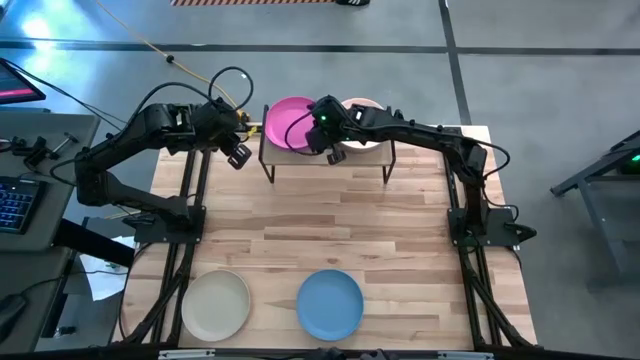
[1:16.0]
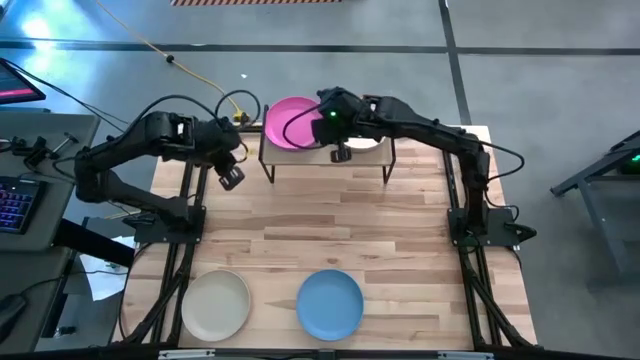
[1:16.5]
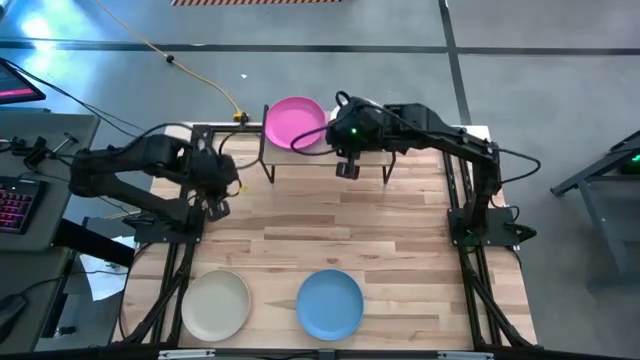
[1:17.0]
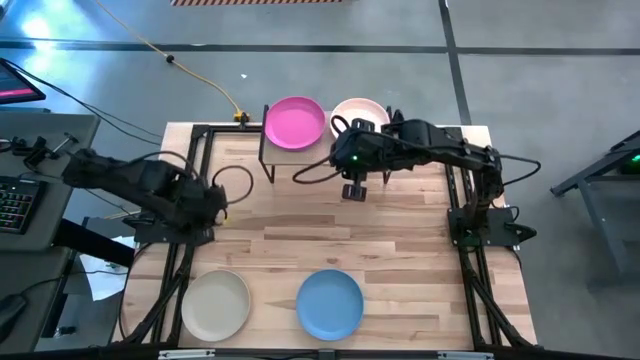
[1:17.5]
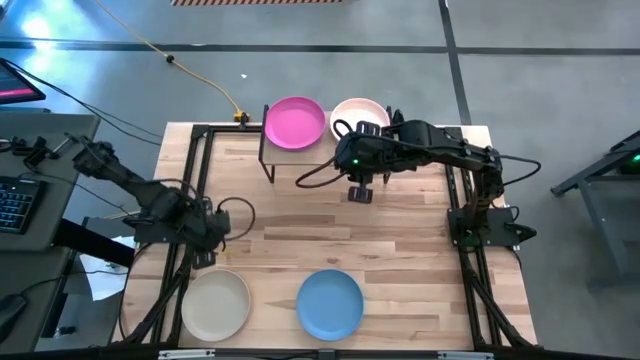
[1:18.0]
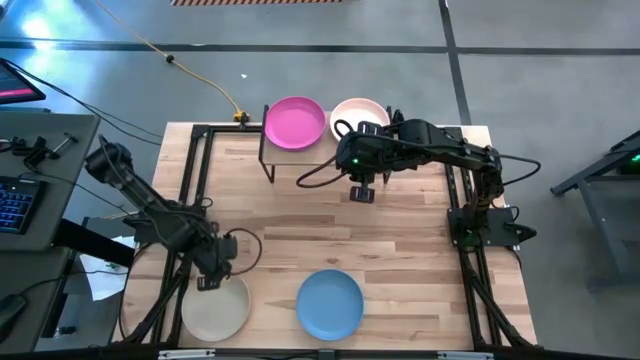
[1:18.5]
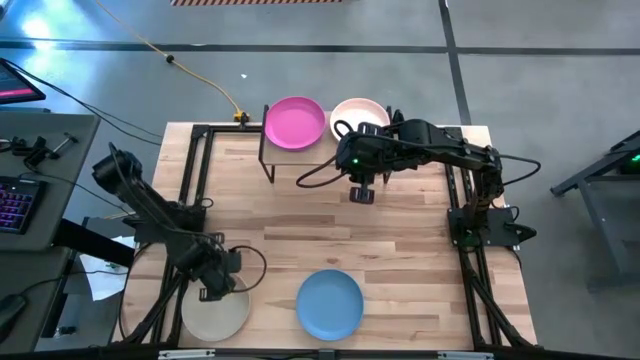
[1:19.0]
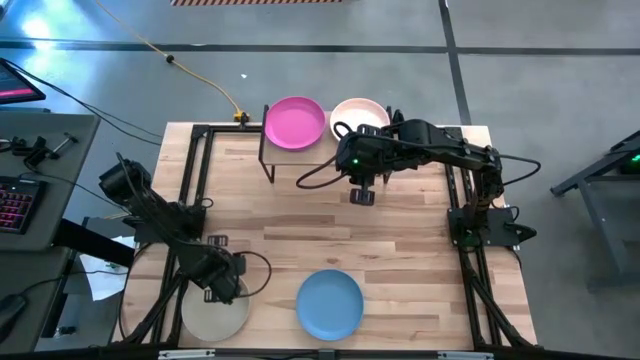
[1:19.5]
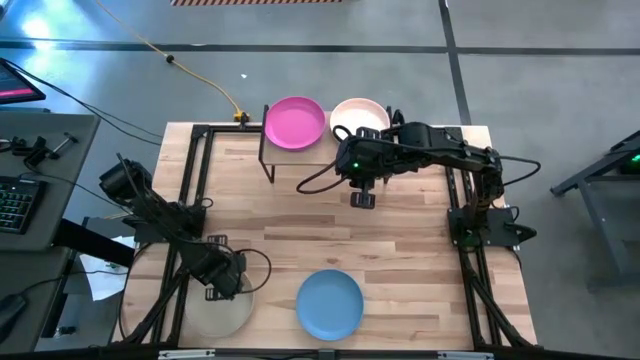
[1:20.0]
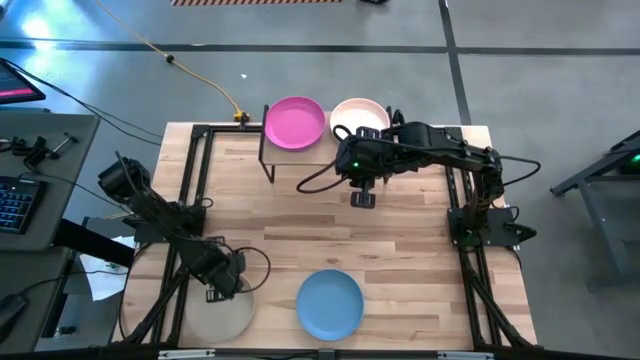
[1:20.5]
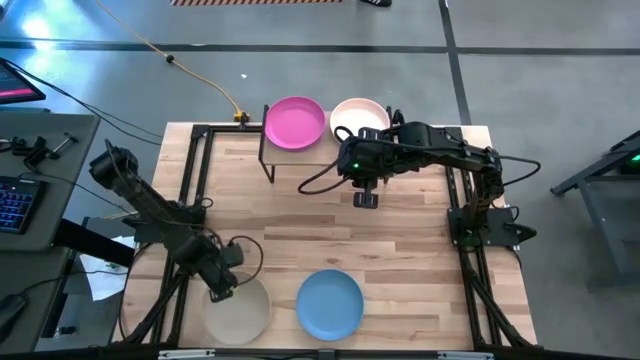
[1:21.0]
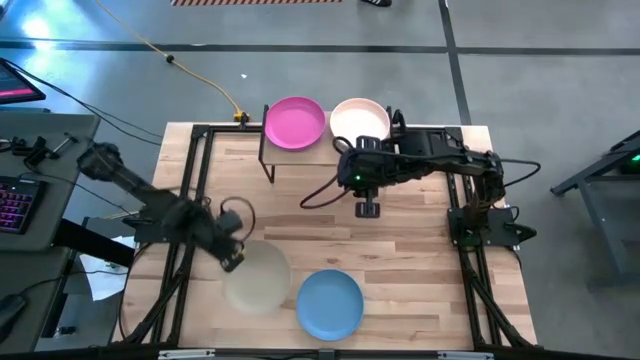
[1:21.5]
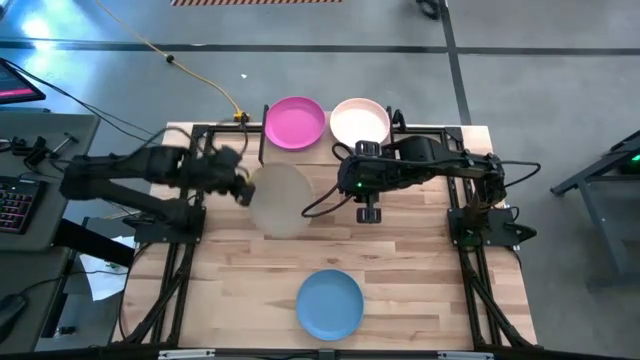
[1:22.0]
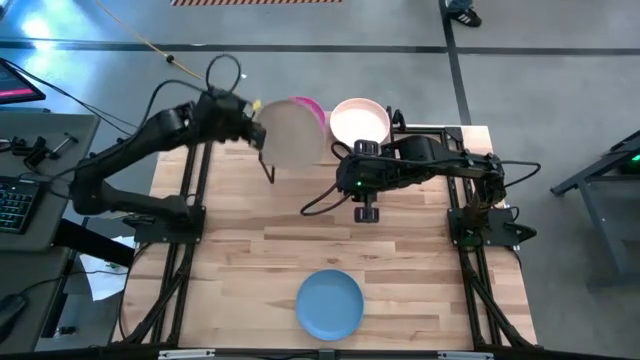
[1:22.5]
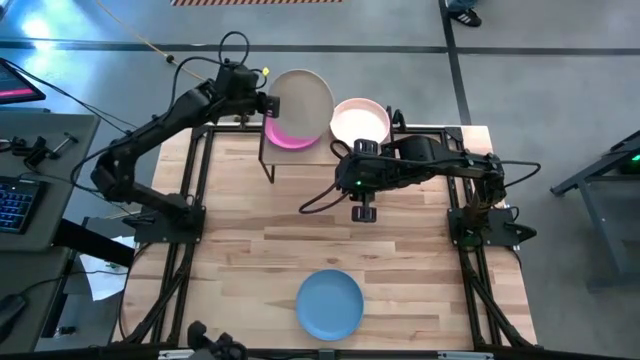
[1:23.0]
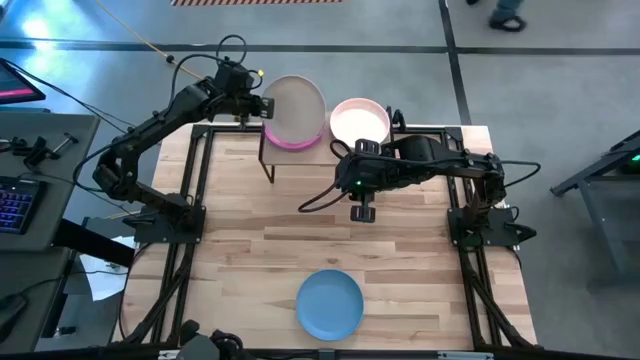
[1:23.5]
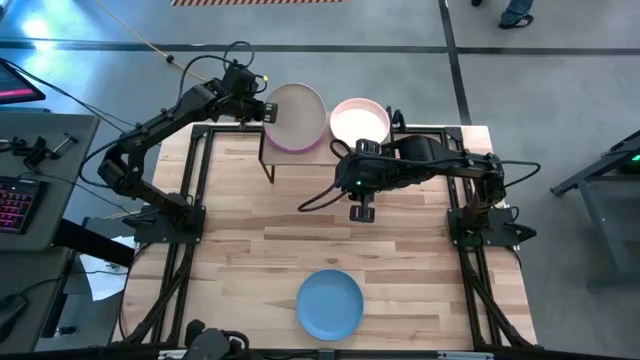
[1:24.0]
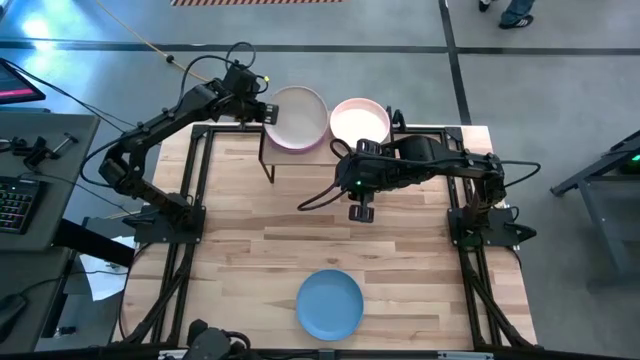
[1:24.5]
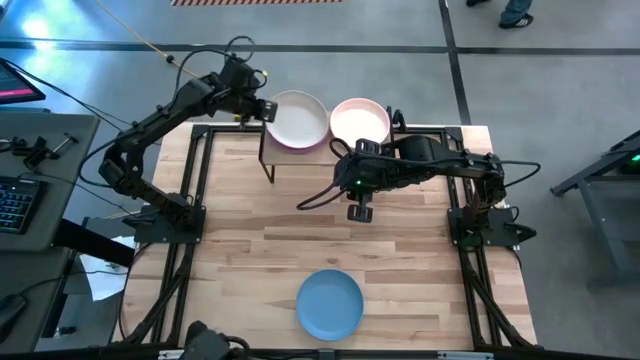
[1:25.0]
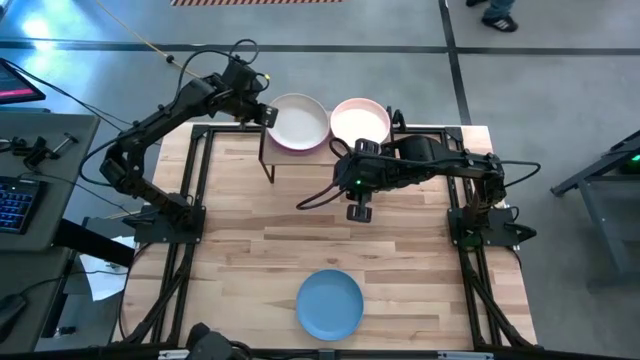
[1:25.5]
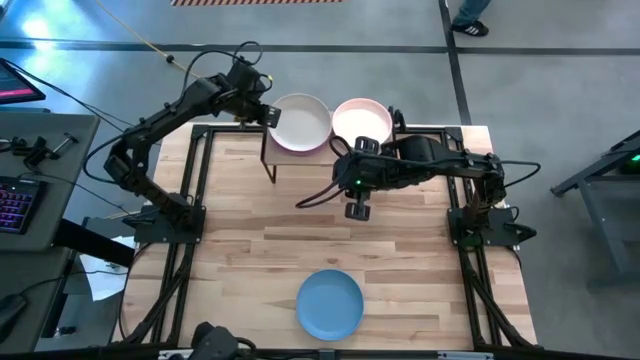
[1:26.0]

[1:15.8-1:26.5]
Task: Place and stack plates onto a shelf
Stack the left gray plate on top of the pink plate on the shelf

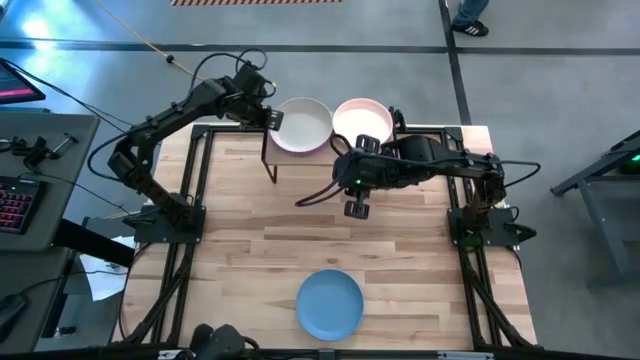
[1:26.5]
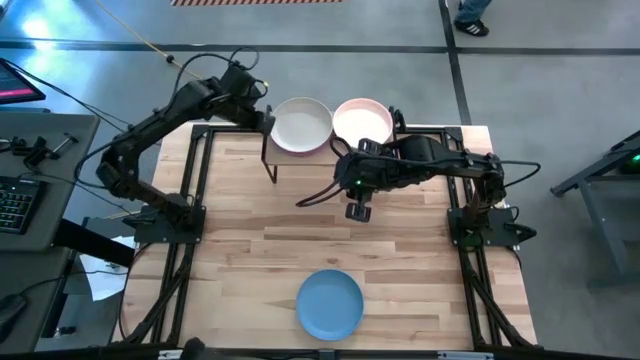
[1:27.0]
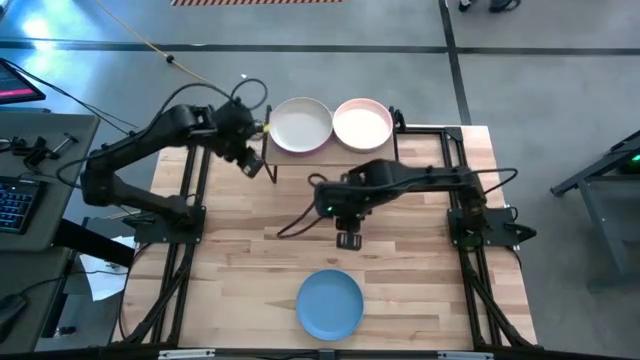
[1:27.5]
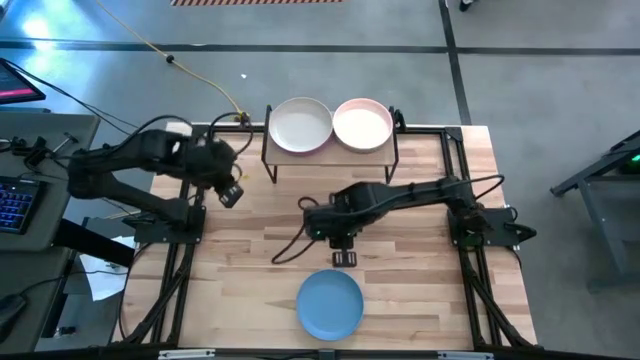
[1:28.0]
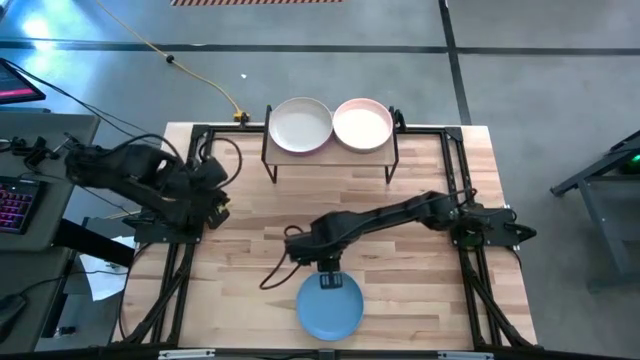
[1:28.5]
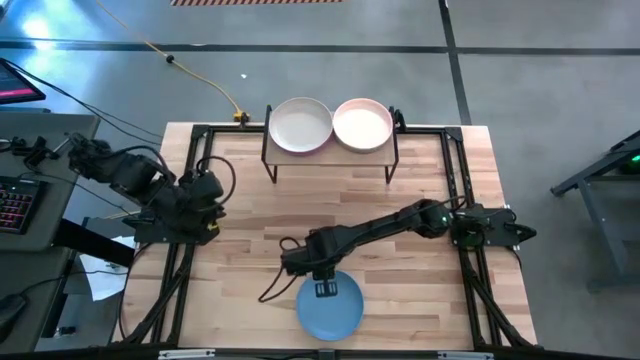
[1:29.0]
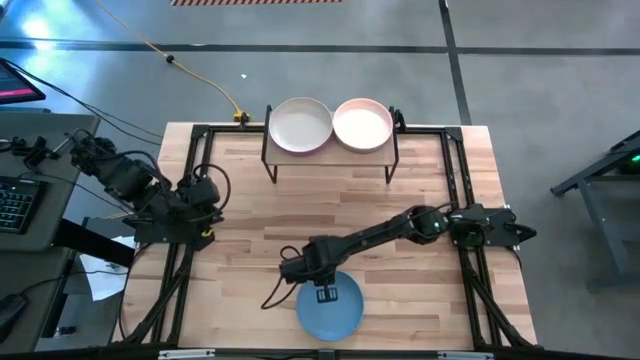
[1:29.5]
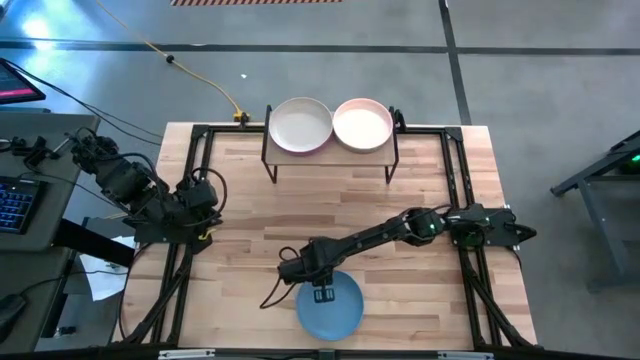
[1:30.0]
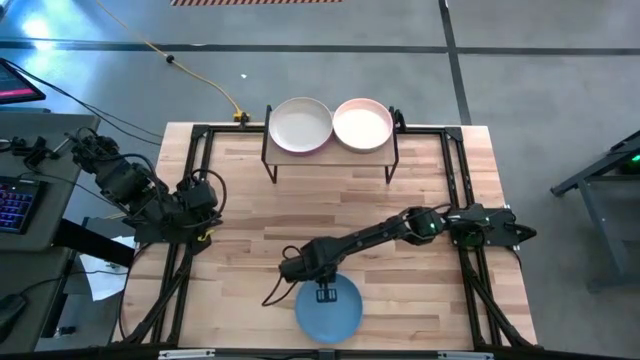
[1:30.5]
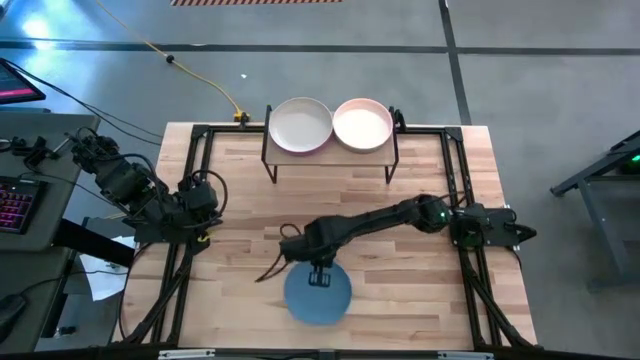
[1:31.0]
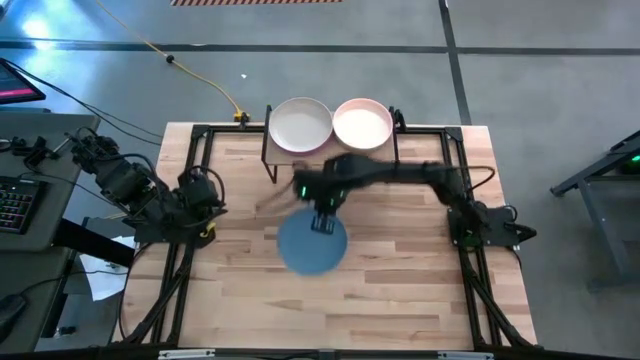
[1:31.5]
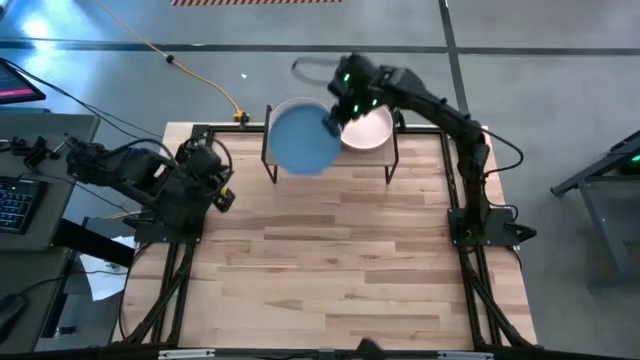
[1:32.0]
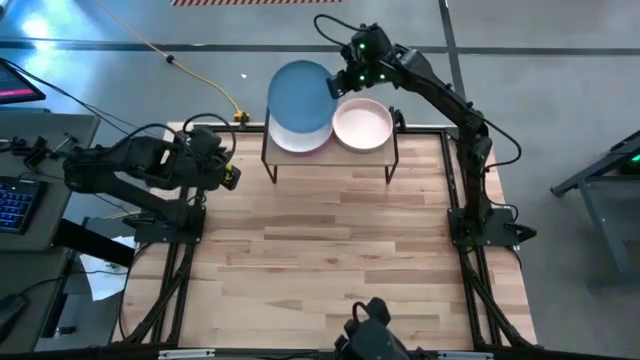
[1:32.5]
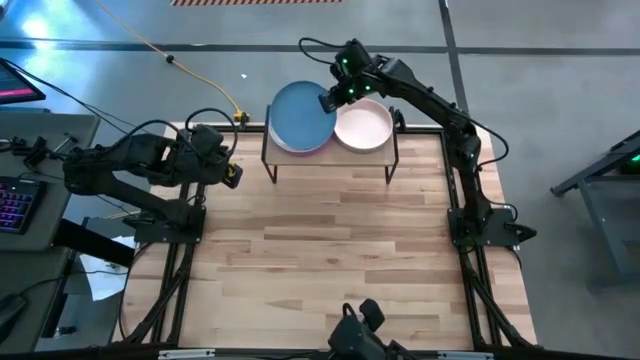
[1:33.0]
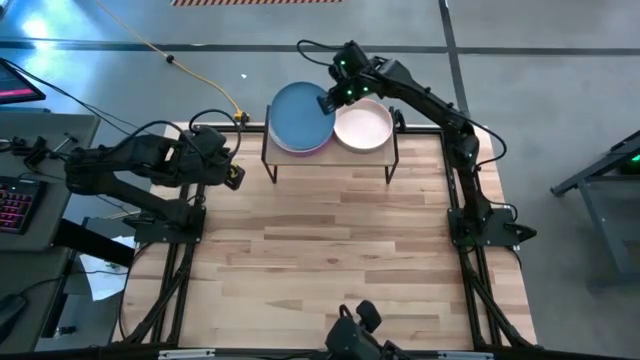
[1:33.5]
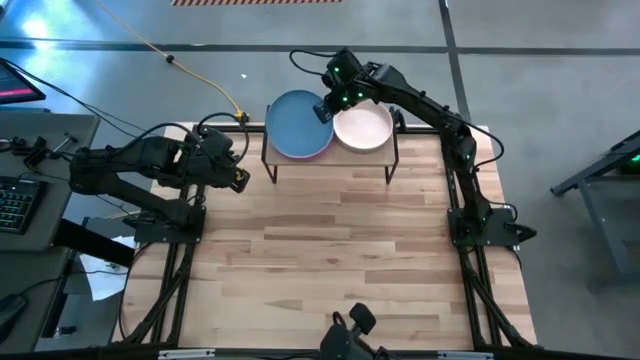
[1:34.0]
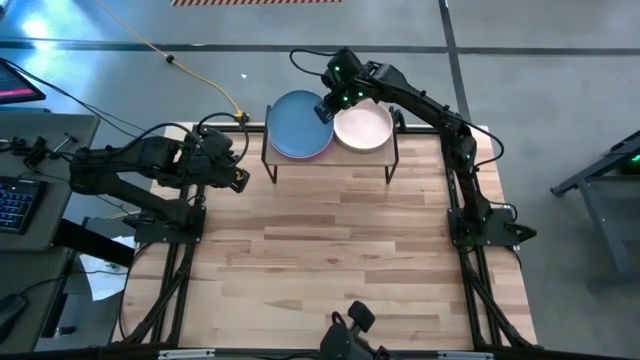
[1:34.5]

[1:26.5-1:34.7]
Stack the blue plate on top of the gray plate on the shelf

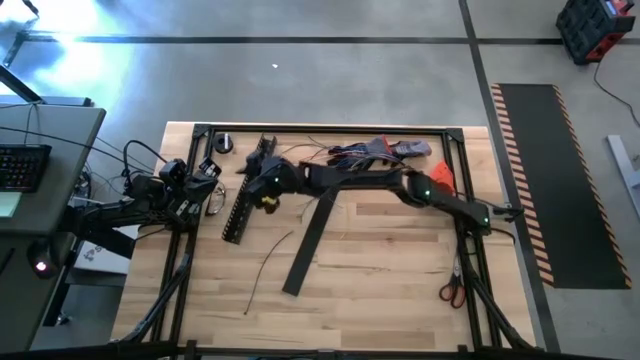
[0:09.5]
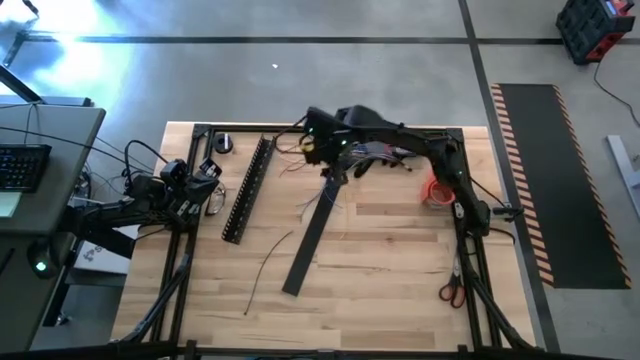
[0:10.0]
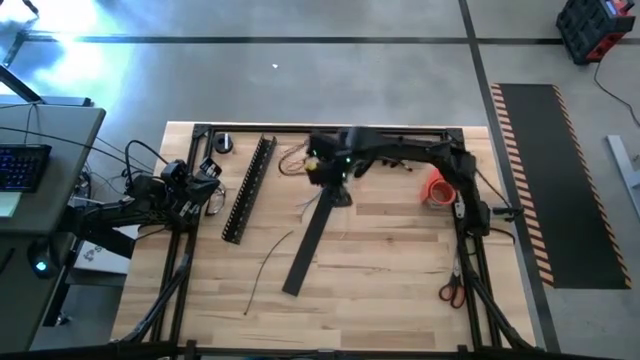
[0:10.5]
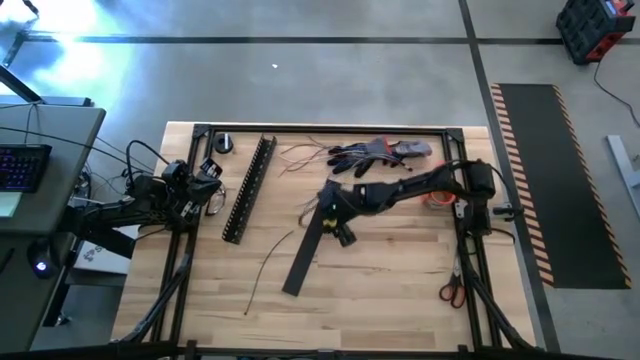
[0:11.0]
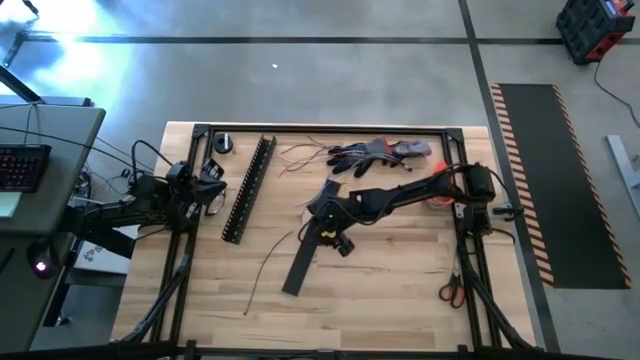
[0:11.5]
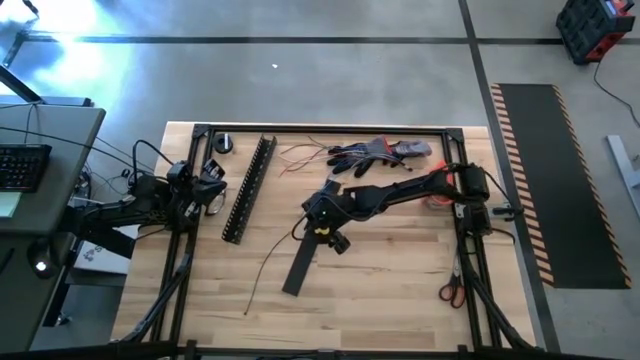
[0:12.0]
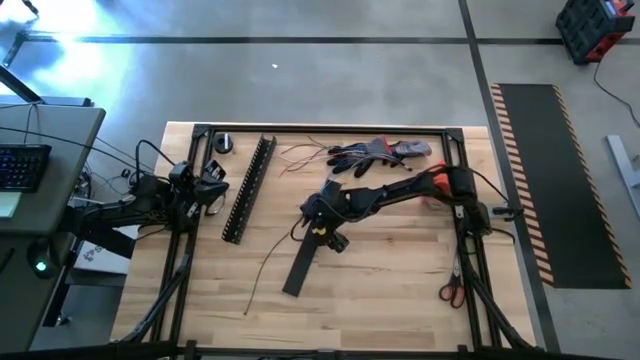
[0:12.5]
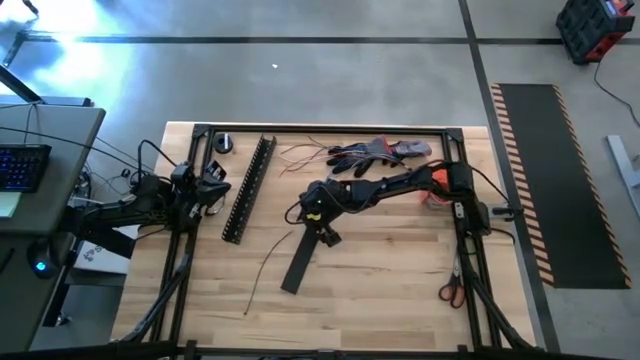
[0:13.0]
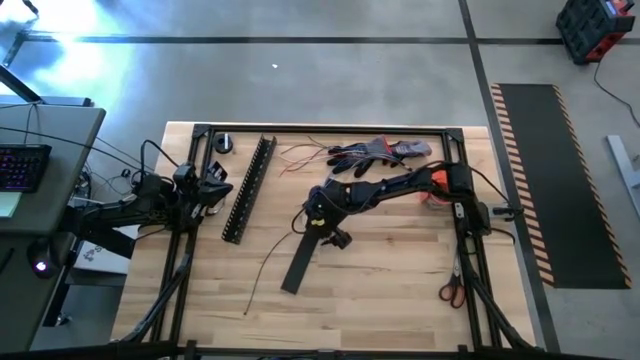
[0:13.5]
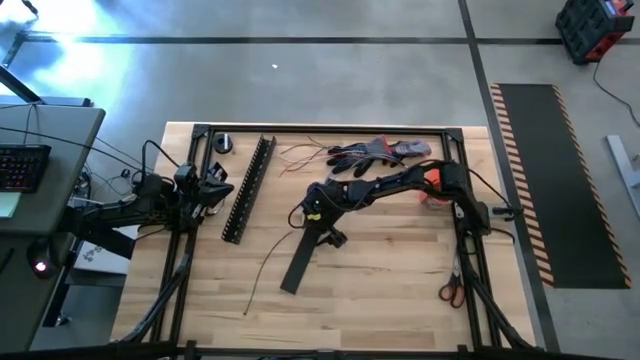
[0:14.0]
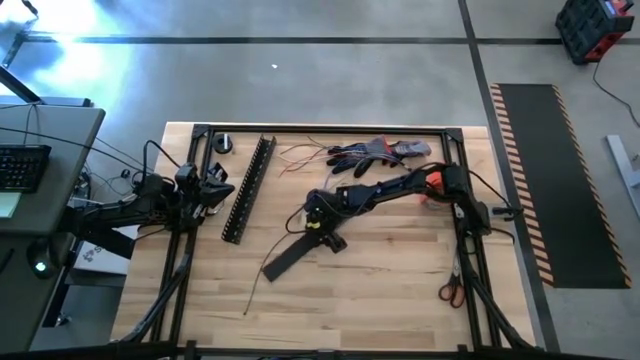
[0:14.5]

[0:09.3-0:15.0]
Task: Ziptie cables
Put the black cable duct cover into the middle right of the table
